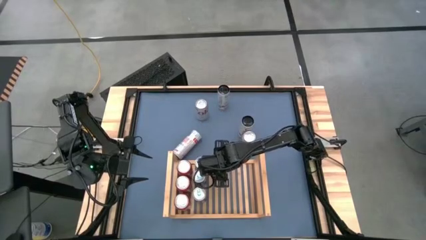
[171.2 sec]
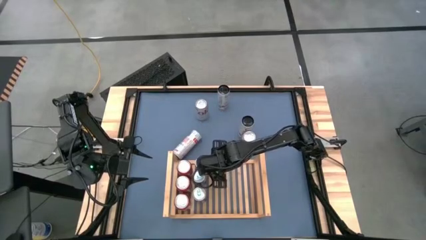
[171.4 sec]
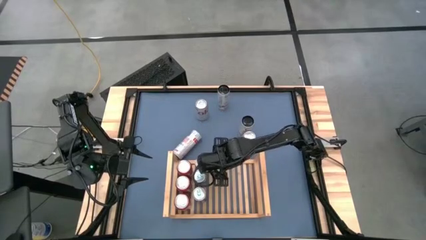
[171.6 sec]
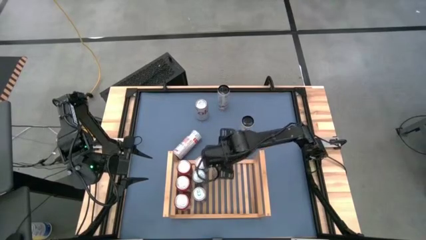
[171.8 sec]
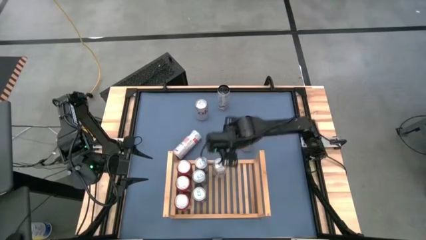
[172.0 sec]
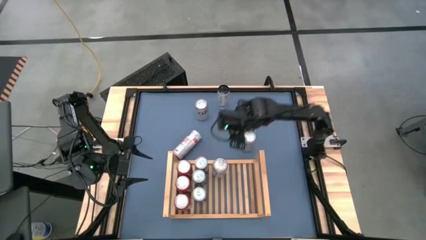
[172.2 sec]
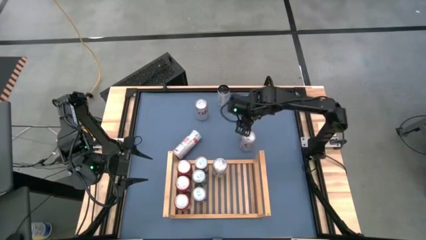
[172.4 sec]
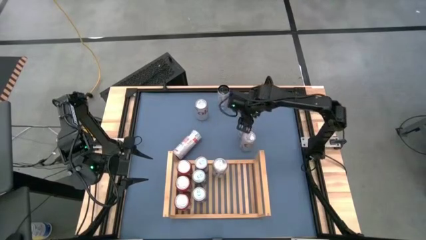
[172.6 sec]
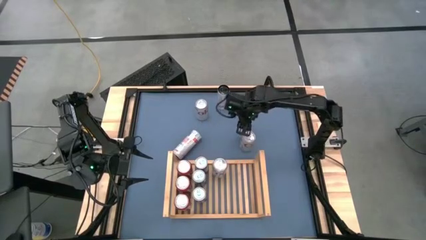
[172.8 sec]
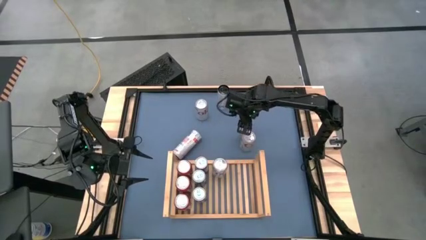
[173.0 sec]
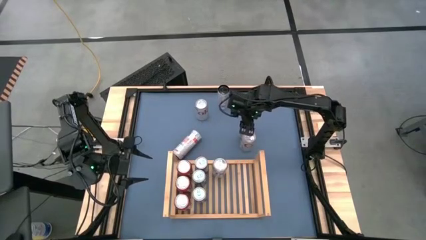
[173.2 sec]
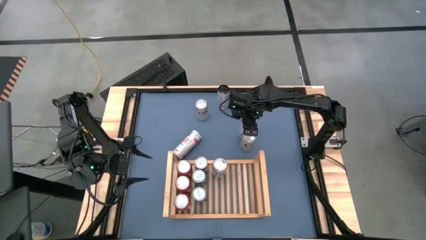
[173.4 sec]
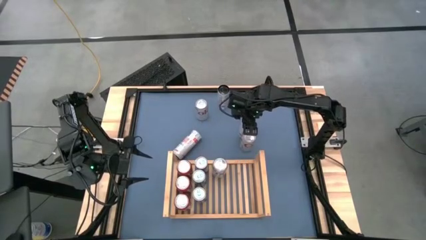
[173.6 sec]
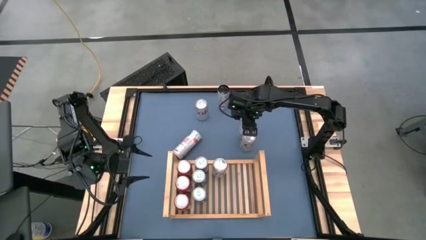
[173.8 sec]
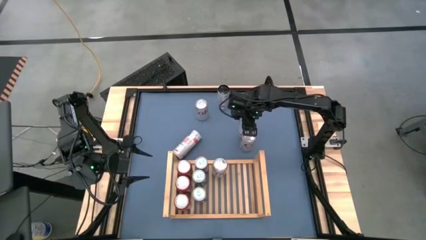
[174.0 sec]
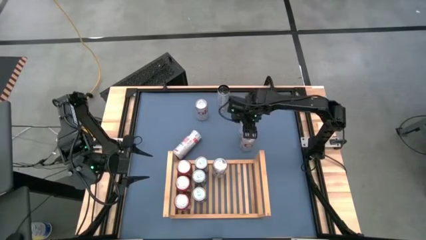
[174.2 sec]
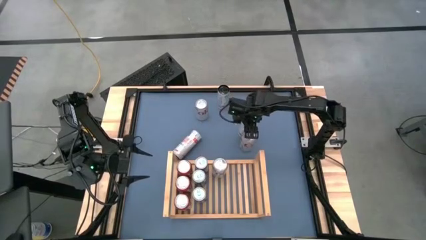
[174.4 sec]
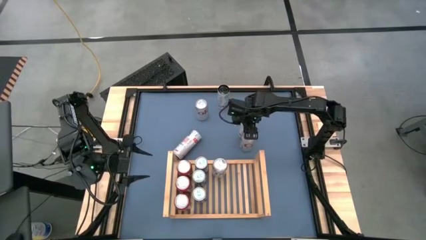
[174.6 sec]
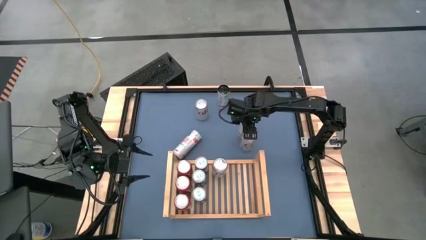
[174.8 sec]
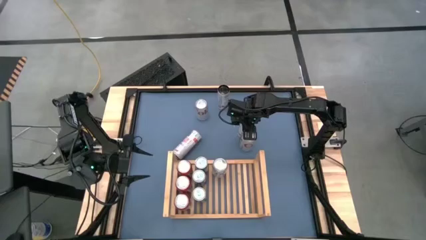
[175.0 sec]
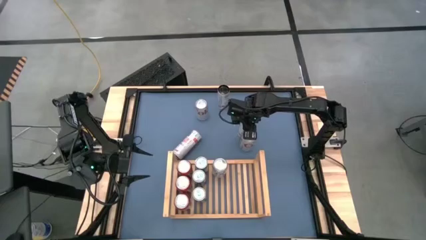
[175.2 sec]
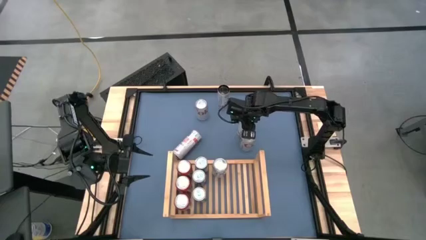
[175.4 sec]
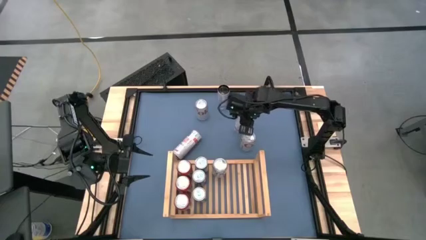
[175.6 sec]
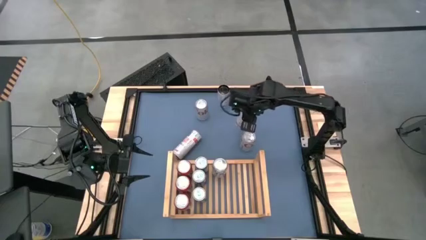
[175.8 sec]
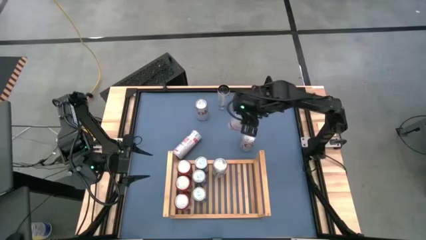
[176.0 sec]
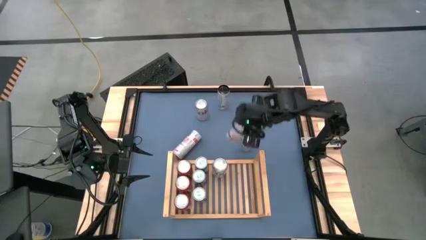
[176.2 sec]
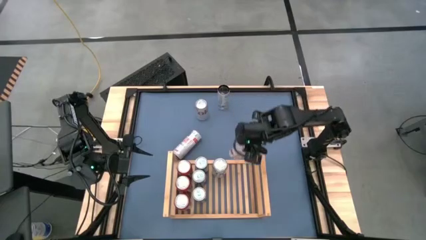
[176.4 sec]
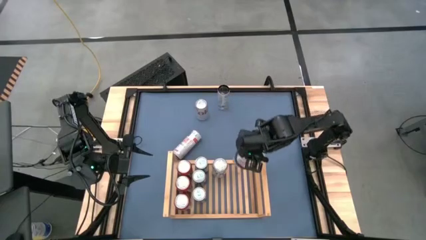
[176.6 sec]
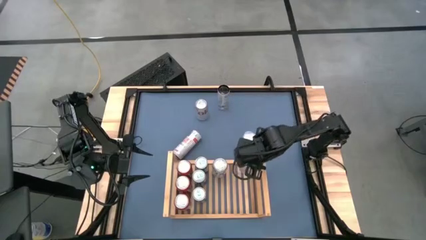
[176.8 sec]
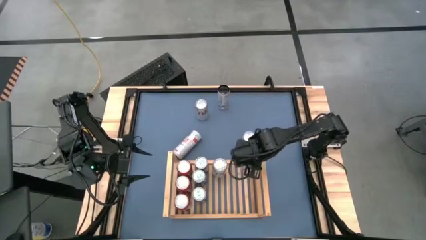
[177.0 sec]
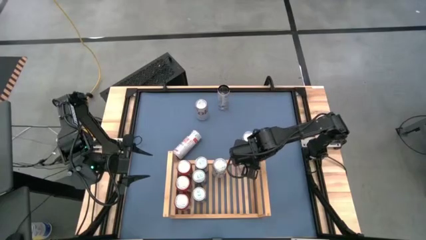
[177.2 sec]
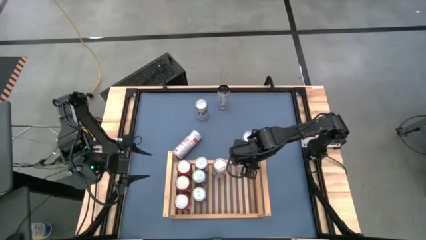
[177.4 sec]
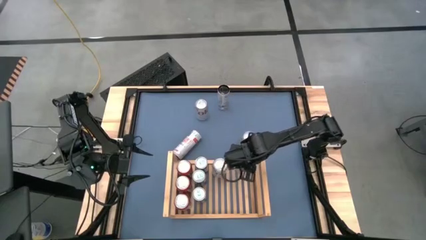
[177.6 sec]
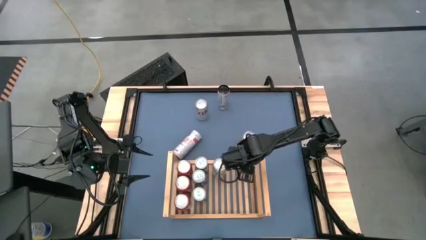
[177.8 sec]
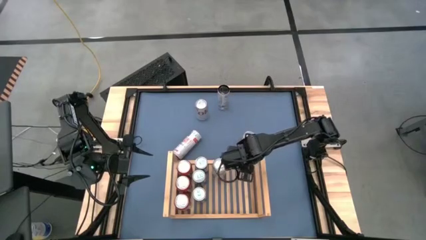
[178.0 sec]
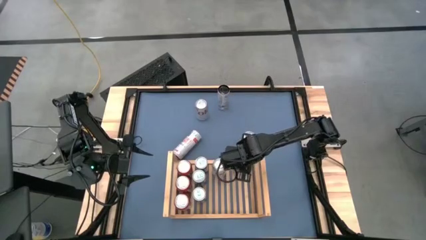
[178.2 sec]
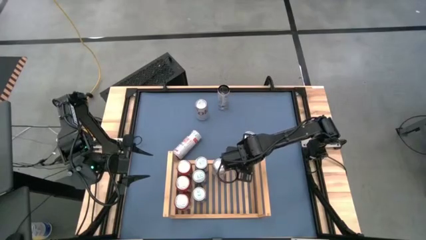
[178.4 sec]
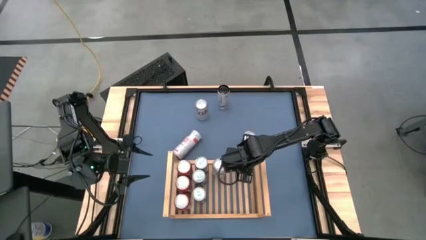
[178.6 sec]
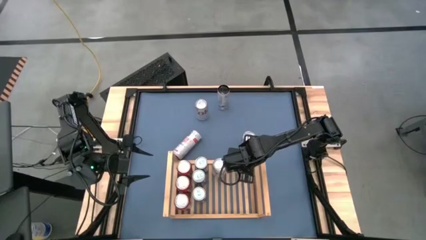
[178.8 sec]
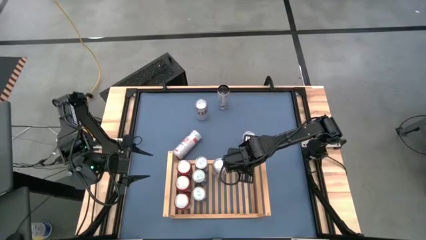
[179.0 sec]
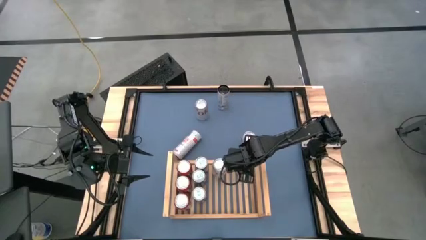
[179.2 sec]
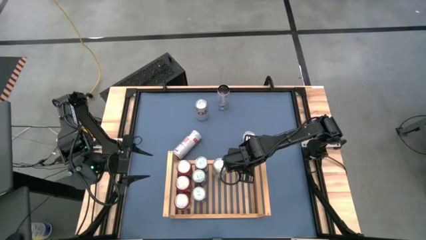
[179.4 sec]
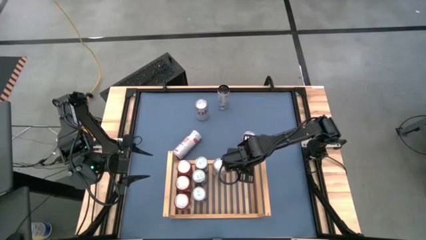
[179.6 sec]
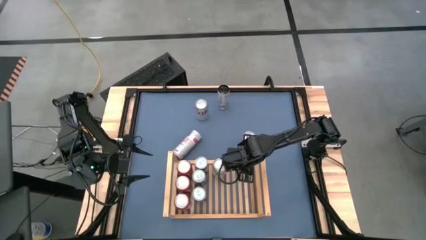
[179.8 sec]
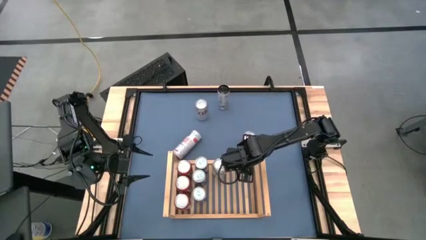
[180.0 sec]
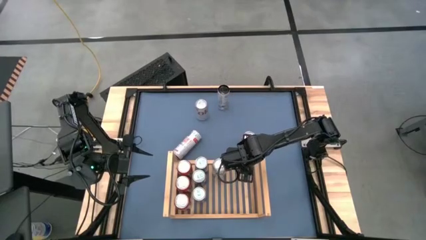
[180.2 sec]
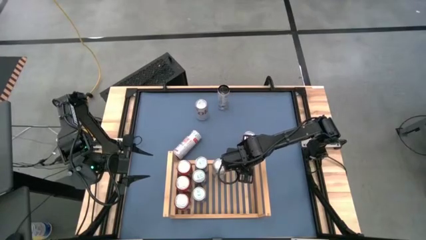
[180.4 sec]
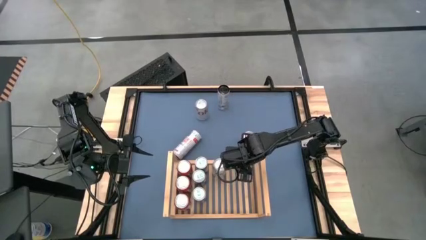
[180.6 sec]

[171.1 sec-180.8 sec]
Task: Place canned beverage on shelf
Put the right white-pink soda can on the shelf

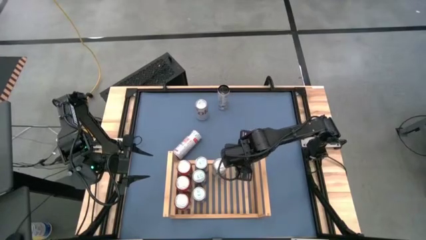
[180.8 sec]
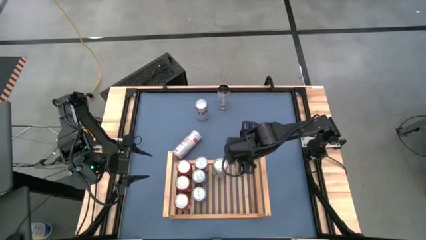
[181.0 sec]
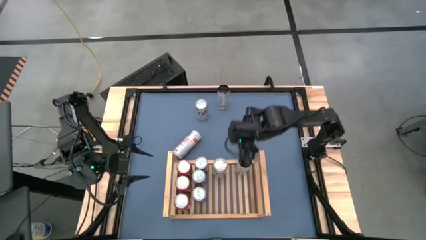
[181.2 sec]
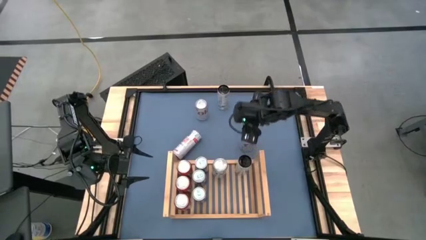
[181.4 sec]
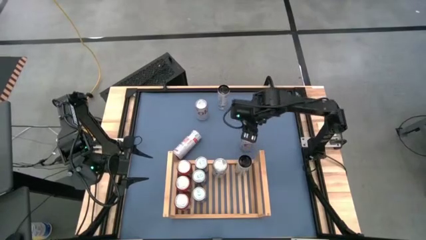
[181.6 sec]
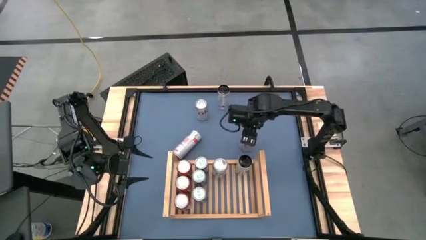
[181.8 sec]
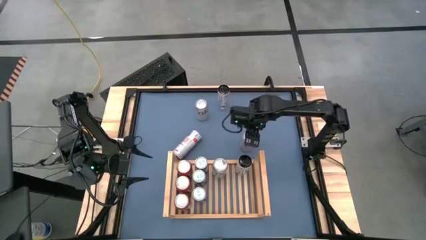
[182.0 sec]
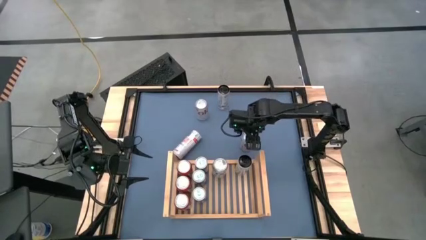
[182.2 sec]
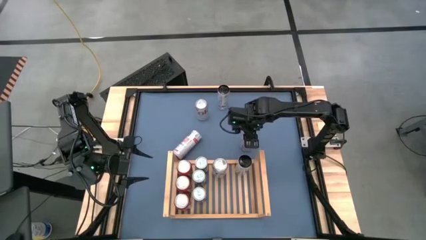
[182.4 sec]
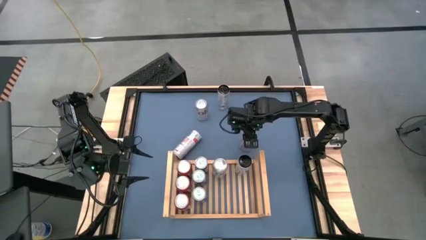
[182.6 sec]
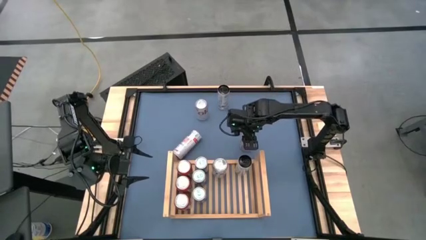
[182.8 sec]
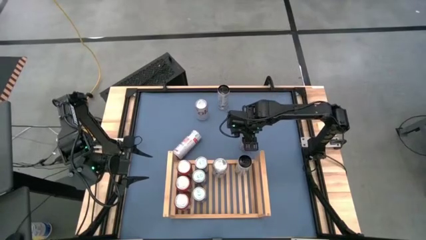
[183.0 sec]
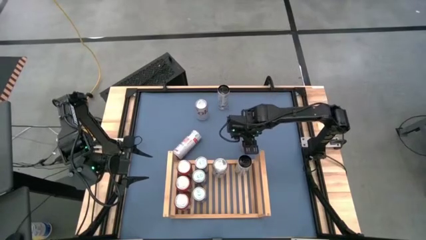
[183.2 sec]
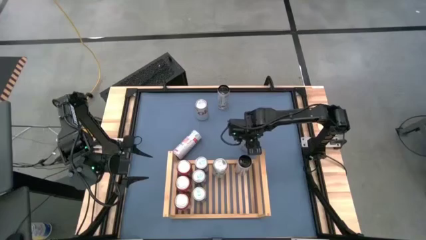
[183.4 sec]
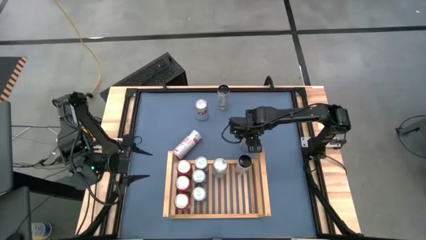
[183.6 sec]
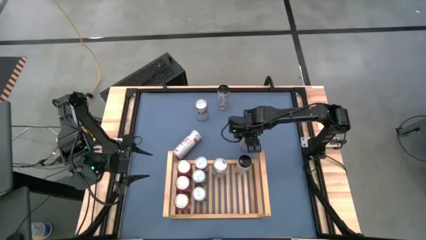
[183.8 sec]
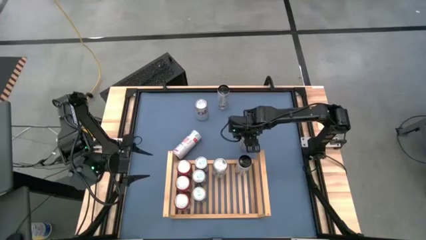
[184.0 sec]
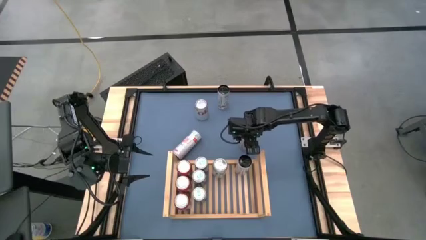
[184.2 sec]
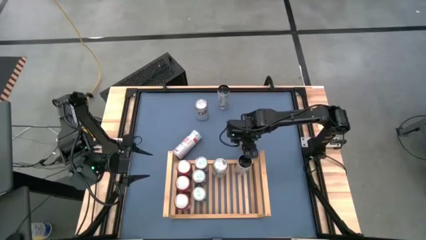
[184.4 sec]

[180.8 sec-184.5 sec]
Put the bottom white-pink soda can on the shelf
